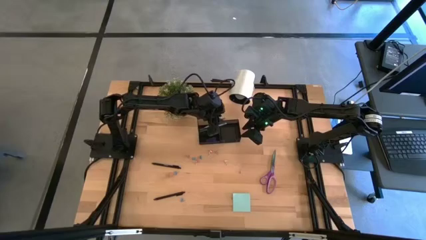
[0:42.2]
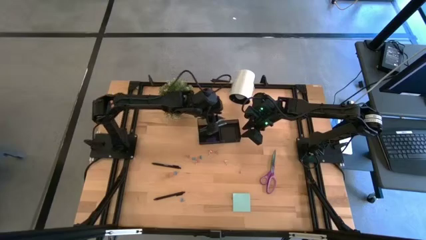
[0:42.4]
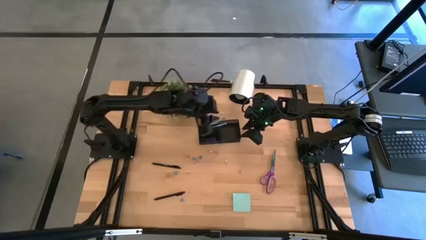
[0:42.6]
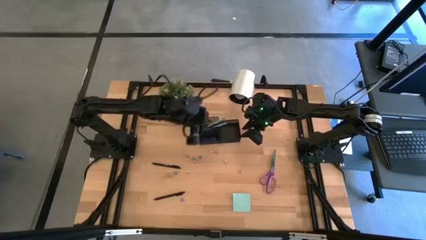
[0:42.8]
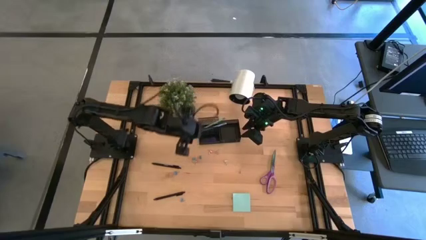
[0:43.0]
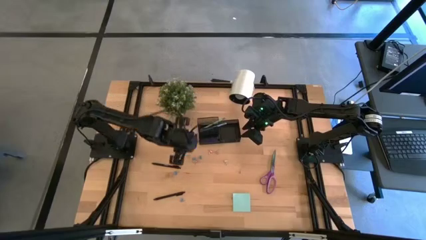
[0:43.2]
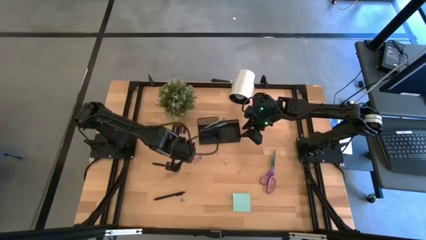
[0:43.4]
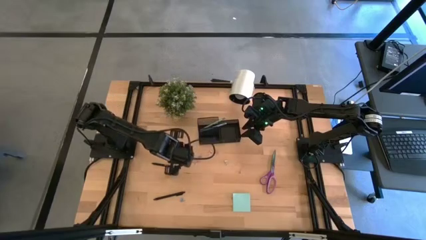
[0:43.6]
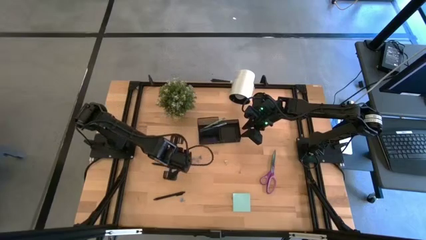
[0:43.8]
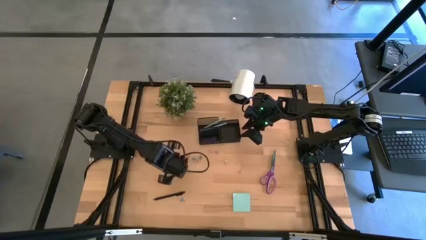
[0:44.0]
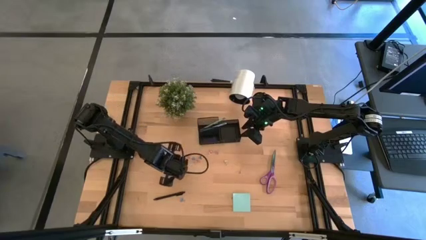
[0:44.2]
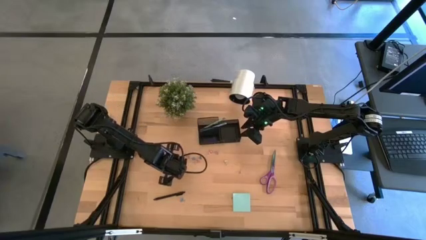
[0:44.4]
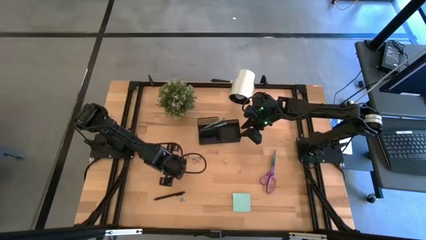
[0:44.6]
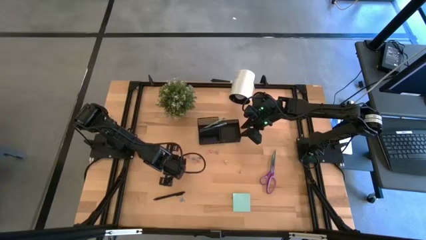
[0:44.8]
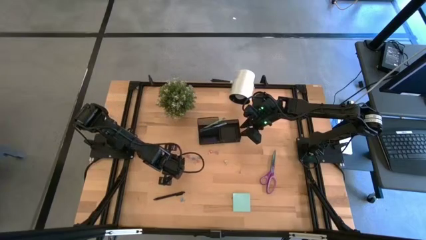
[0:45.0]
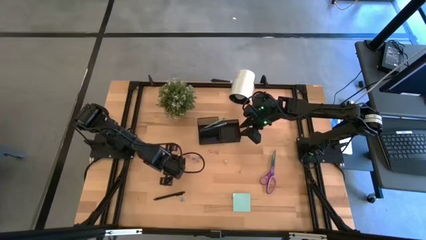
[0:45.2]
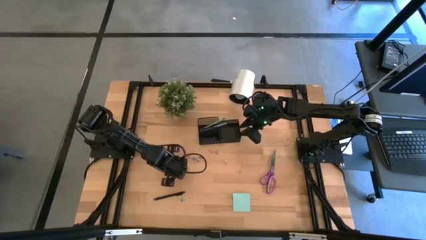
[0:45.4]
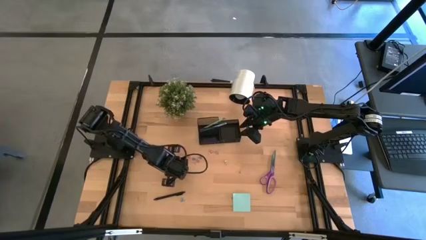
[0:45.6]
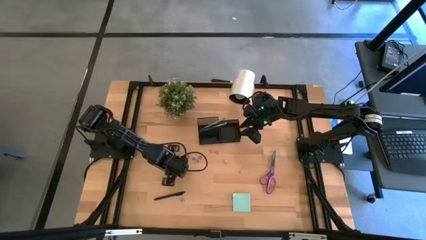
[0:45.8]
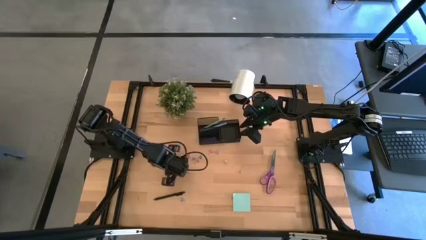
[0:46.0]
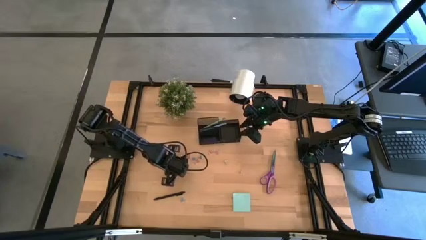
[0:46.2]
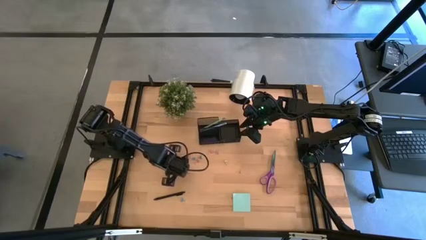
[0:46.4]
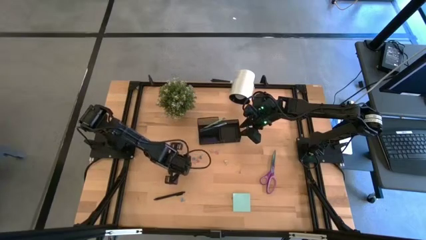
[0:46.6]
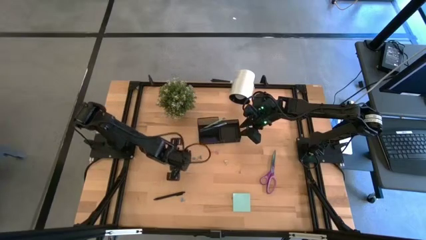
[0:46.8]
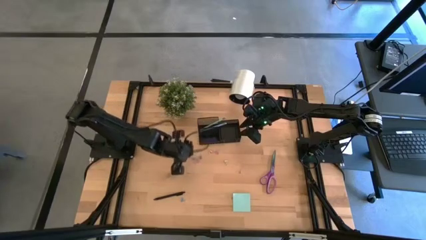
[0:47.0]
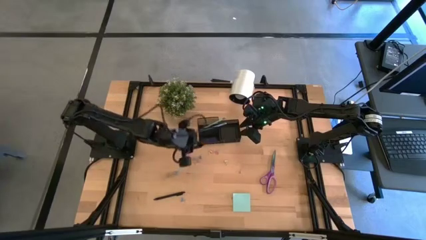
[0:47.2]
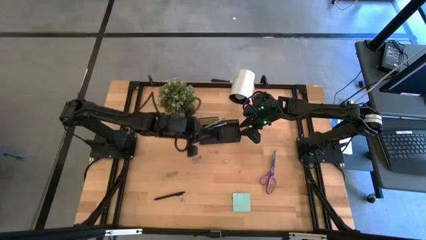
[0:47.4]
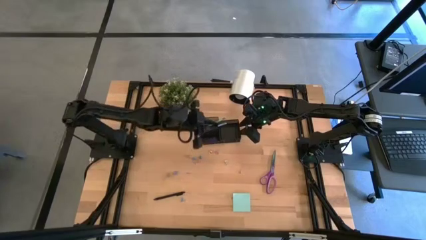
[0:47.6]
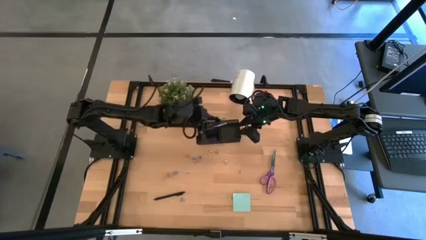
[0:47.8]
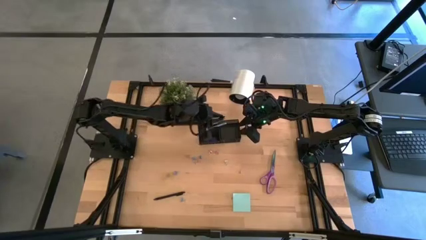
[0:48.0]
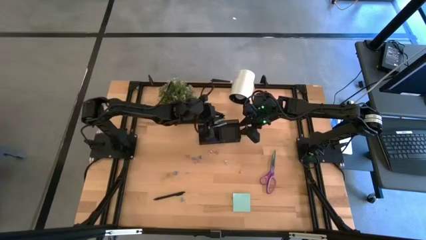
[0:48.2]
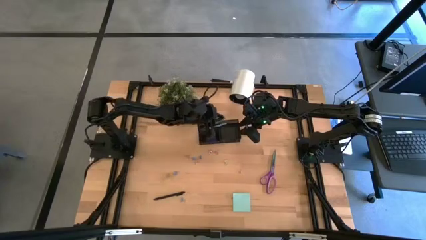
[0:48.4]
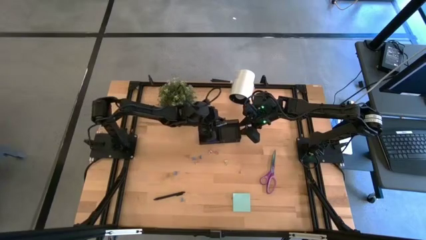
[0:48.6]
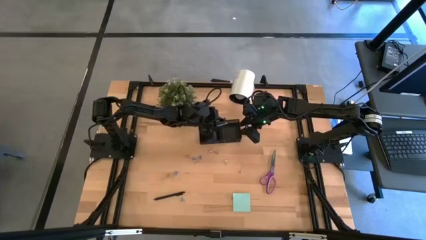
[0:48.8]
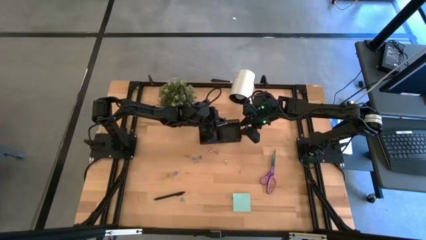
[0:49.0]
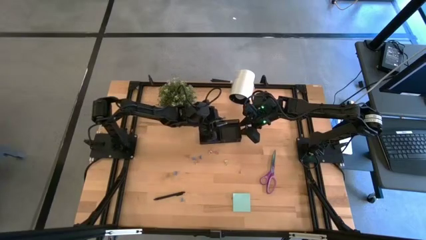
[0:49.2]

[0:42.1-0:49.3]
Task: Pick and place office supplies into organizer
Put the black pen into the black desk organizer

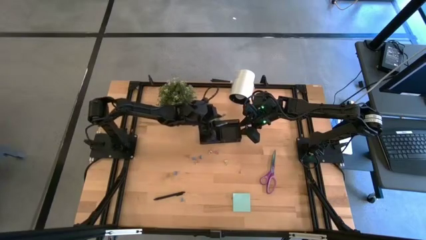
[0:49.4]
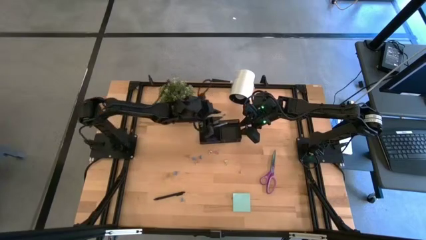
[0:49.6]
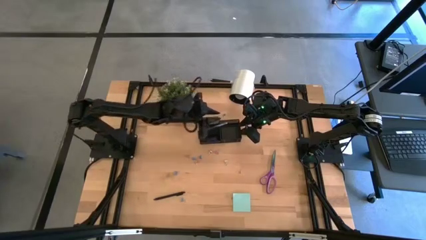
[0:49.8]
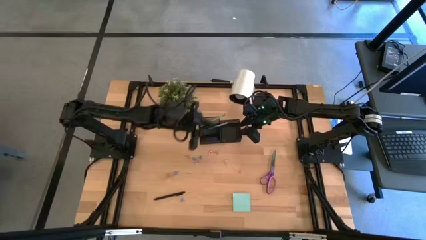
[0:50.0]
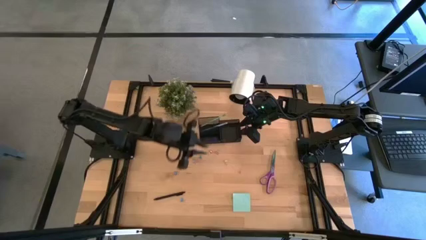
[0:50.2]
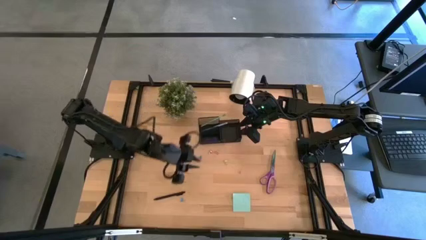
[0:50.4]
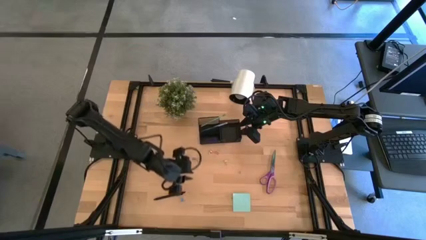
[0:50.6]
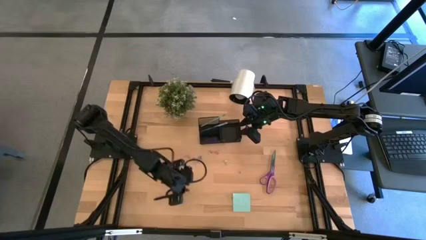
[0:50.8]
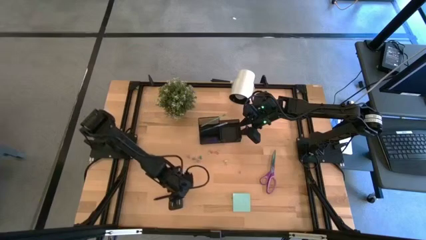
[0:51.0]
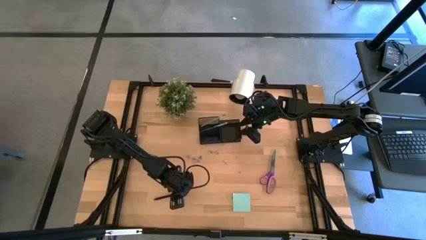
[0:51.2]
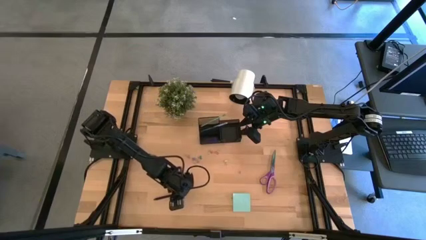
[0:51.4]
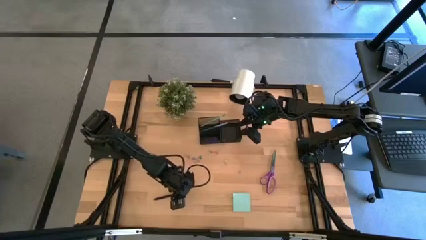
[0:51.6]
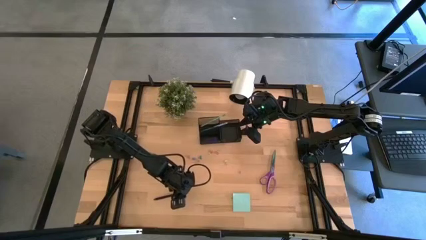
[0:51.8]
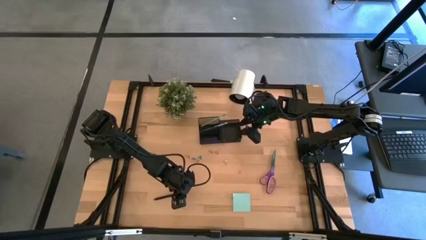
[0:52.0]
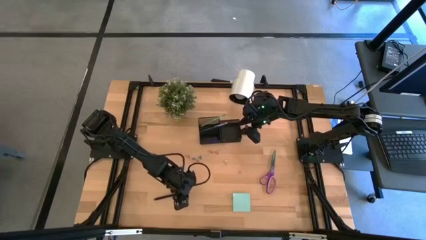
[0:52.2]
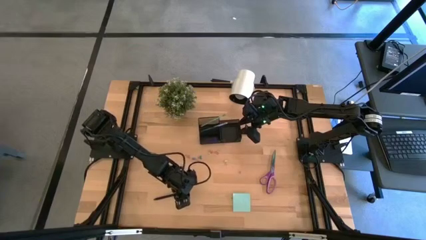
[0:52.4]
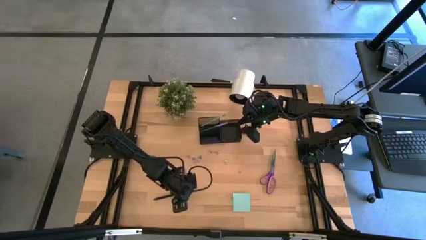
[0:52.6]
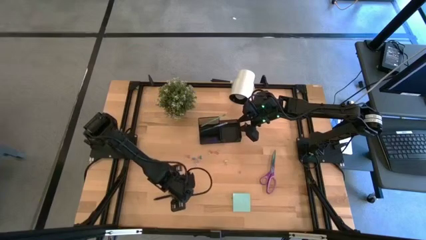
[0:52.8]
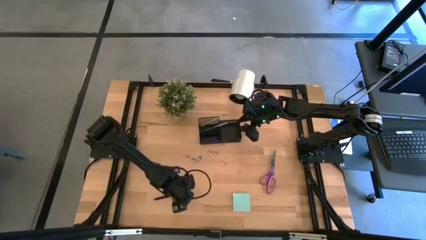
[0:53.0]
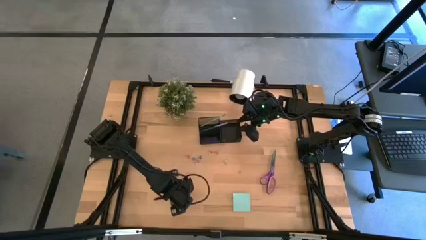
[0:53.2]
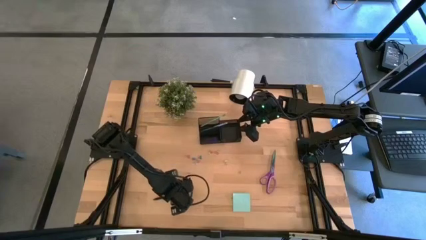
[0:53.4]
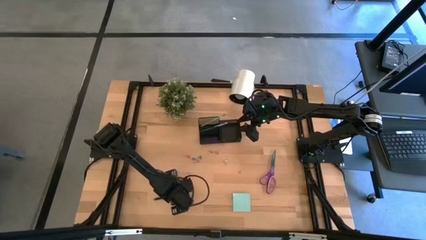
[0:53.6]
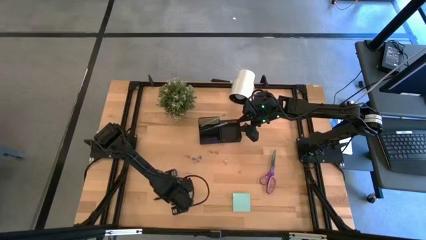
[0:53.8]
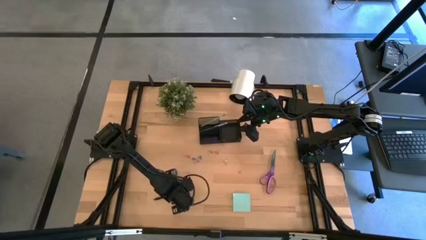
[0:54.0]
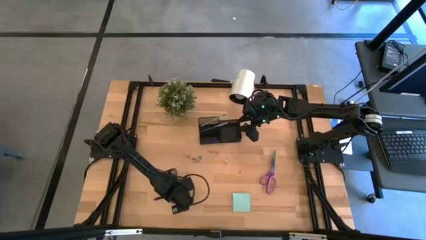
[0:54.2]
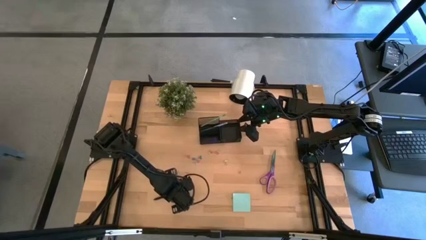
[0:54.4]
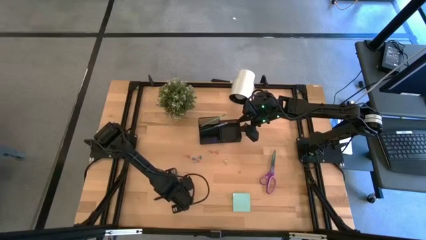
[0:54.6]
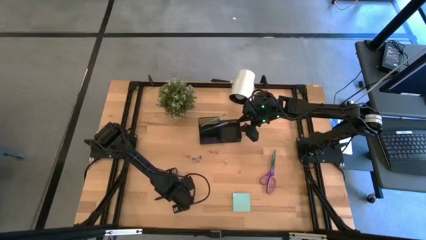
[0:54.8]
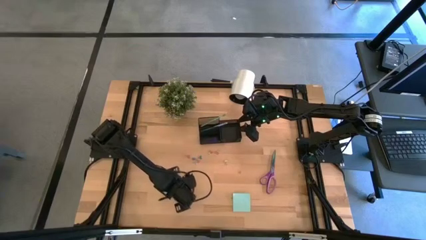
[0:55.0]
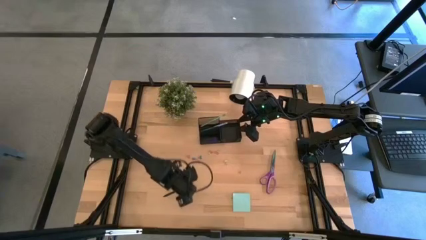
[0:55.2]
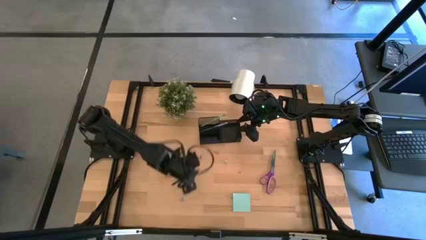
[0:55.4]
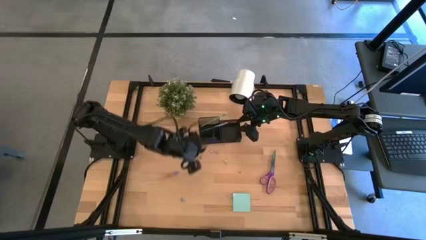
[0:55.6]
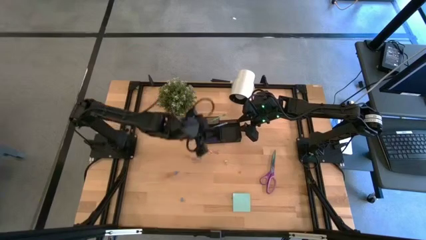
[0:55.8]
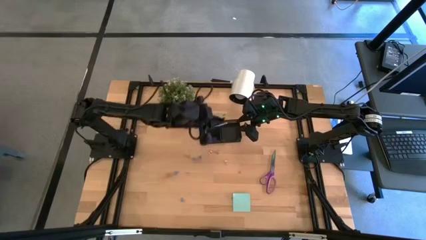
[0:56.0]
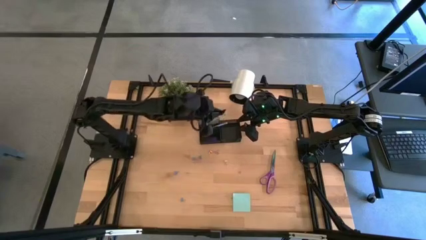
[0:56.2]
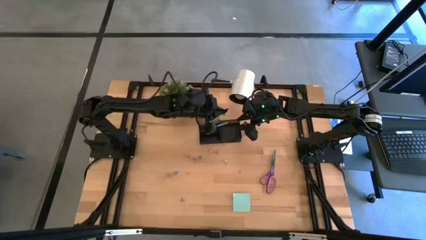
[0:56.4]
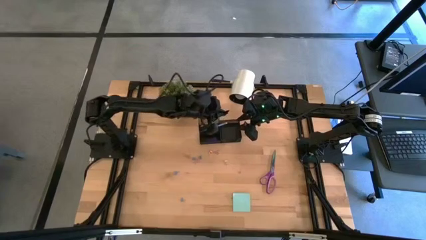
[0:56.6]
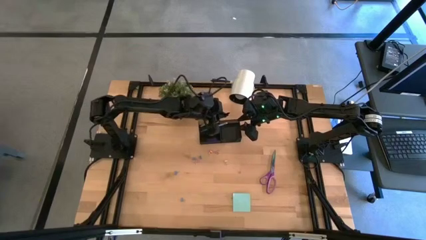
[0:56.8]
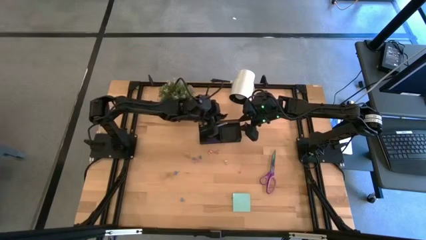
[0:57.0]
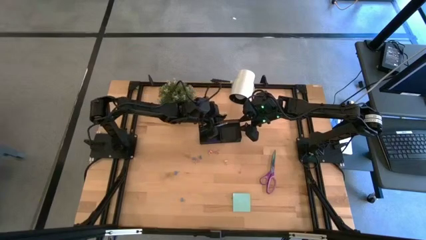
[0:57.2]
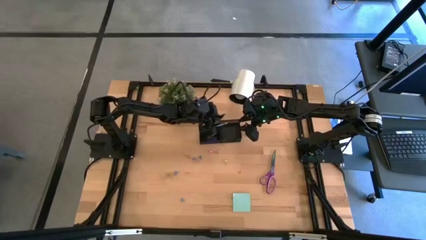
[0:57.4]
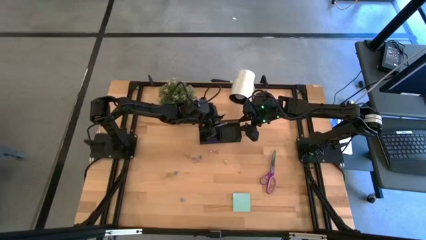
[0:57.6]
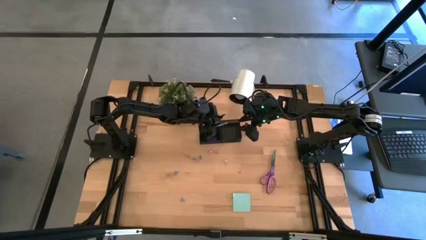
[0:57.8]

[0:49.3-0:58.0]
Put the black pen into the black desk organizer
